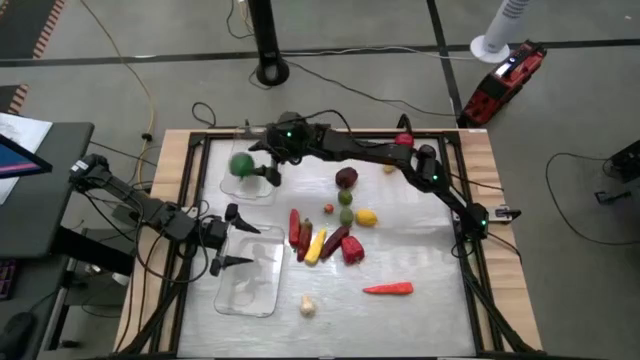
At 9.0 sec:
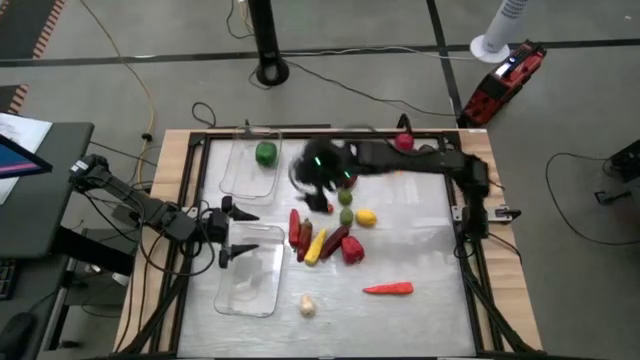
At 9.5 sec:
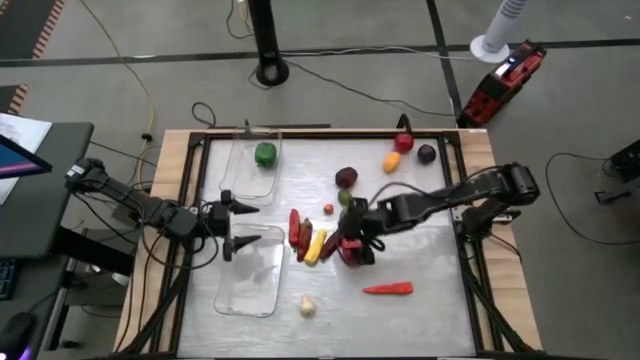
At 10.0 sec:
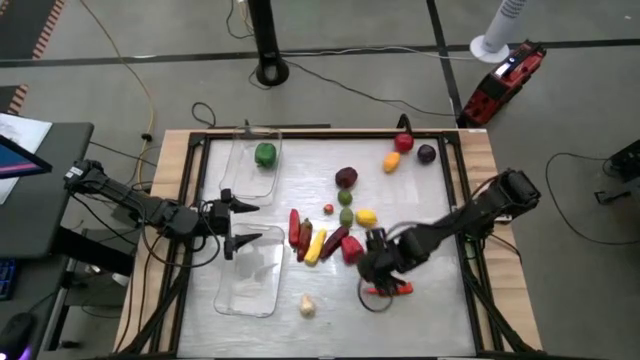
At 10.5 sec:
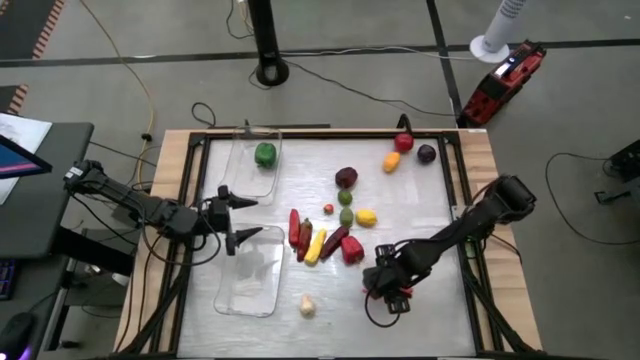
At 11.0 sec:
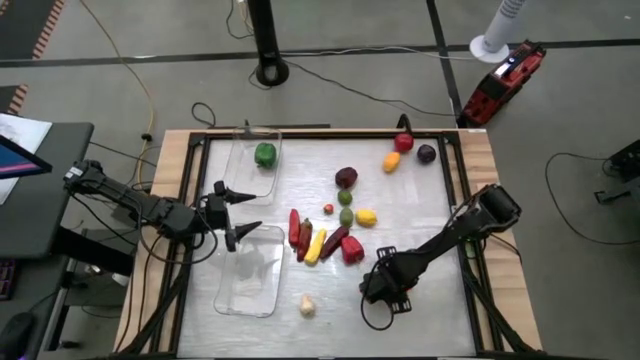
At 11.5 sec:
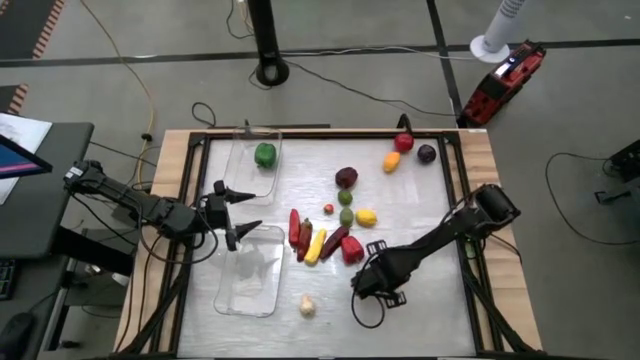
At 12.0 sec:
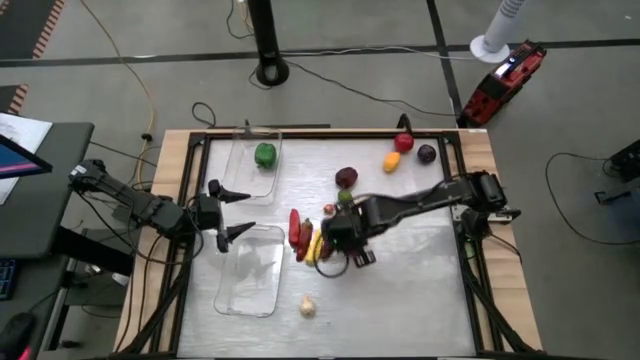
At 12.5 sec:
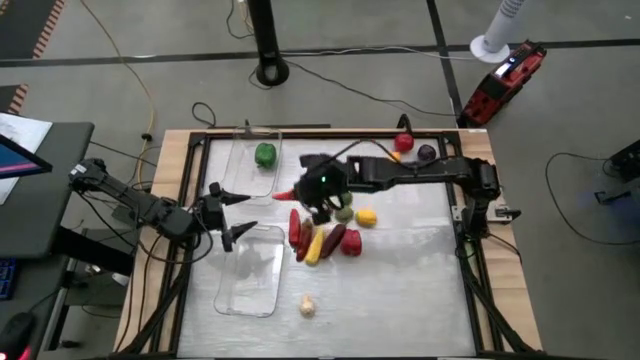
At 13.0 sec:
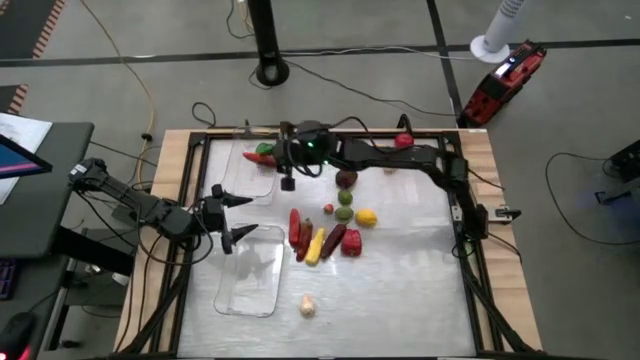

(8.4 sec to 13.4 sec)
Task: Sort produce into baskets
Put the carrot into the top transparent bin

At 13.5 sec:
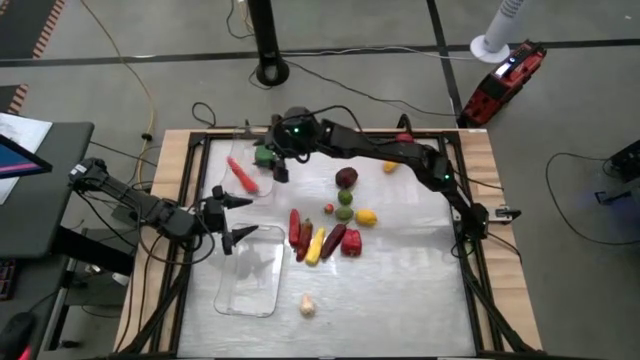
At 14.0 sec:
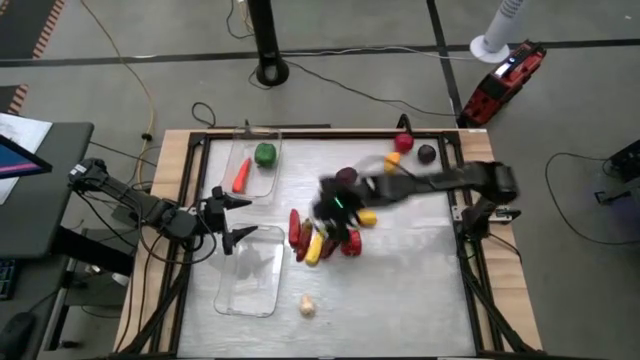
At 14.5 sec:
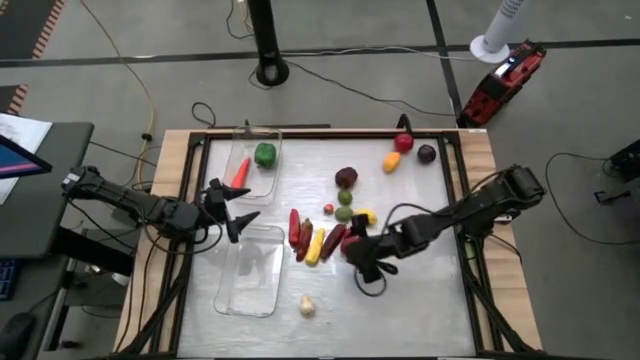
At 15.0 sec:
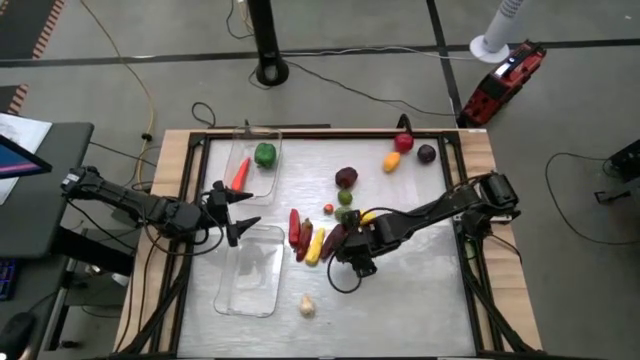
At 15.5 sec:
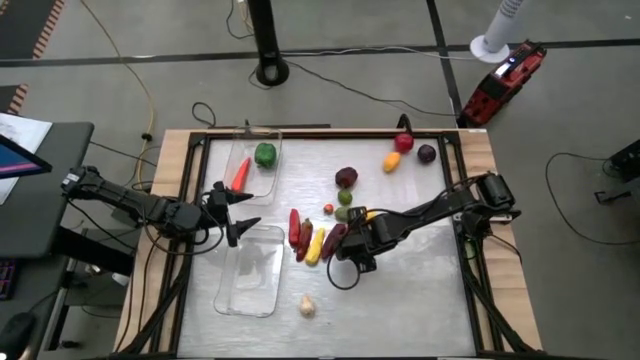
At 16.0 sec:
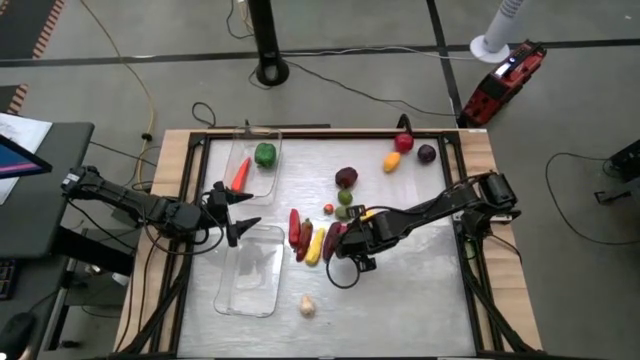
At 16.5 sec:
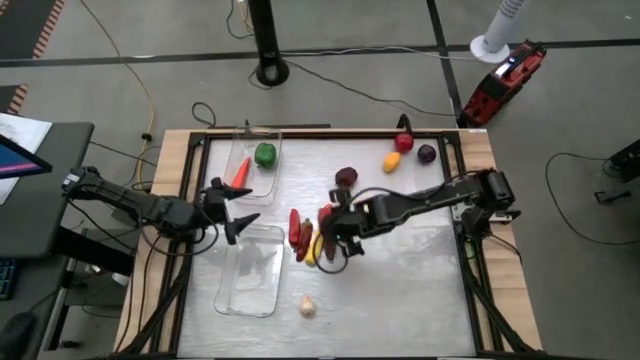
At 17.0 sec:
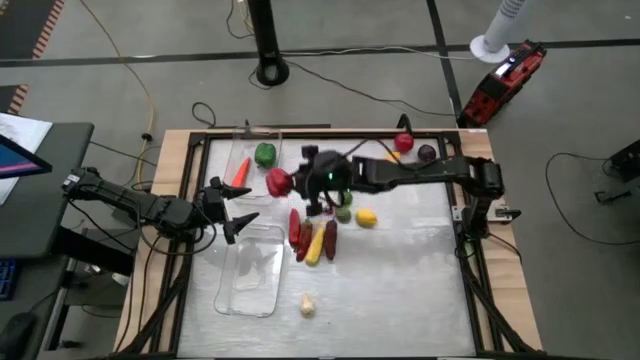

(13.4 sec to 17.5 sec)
Put the red bell pepper into the top transparent bin

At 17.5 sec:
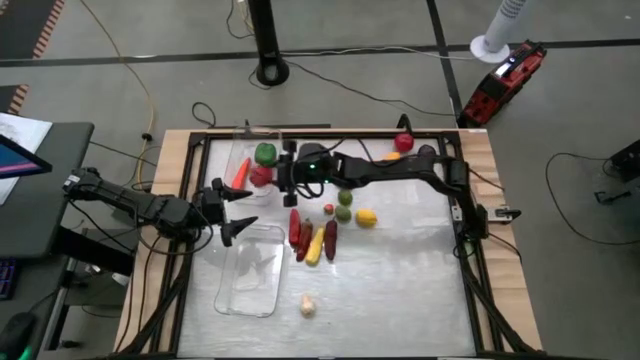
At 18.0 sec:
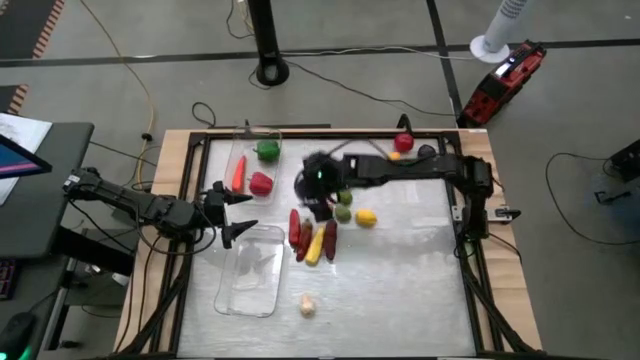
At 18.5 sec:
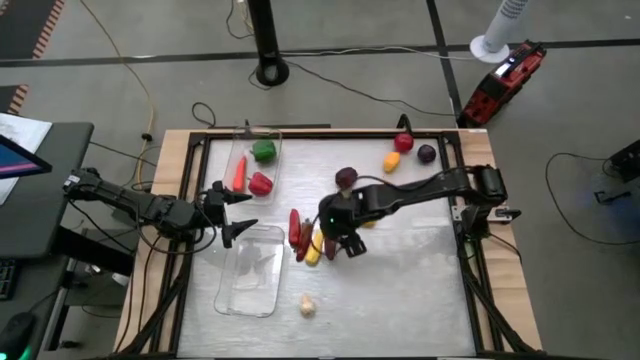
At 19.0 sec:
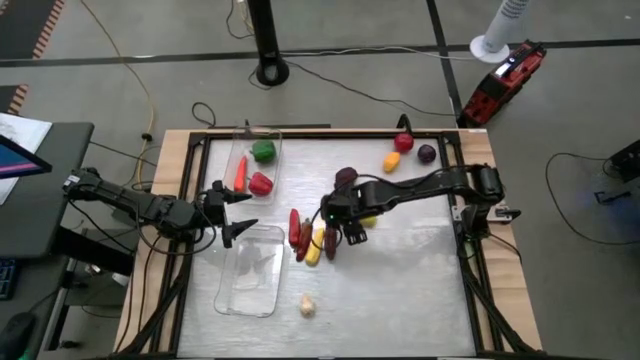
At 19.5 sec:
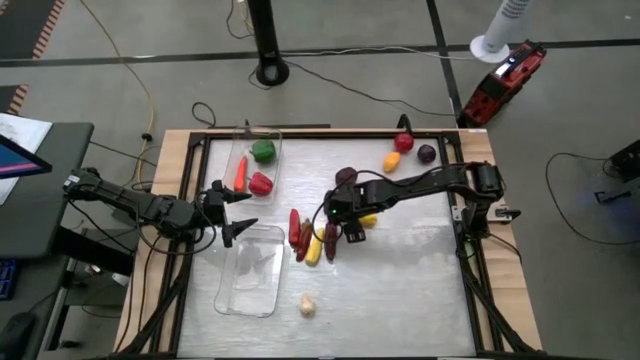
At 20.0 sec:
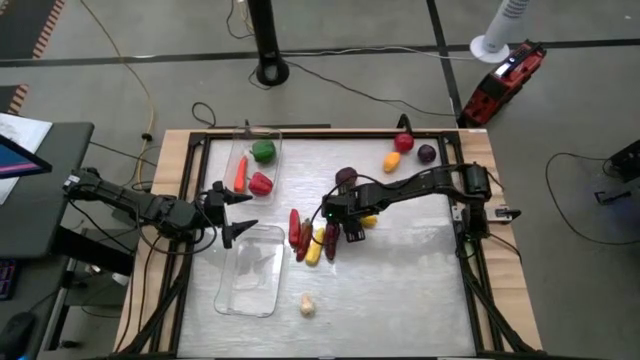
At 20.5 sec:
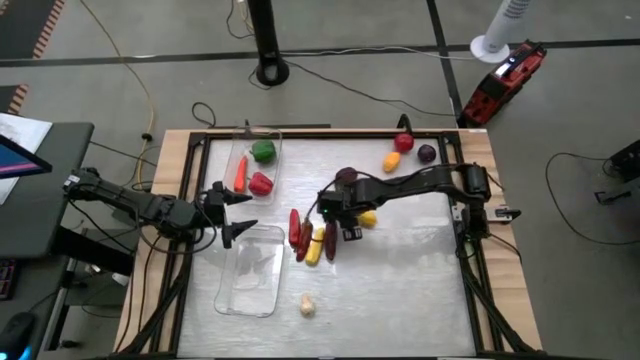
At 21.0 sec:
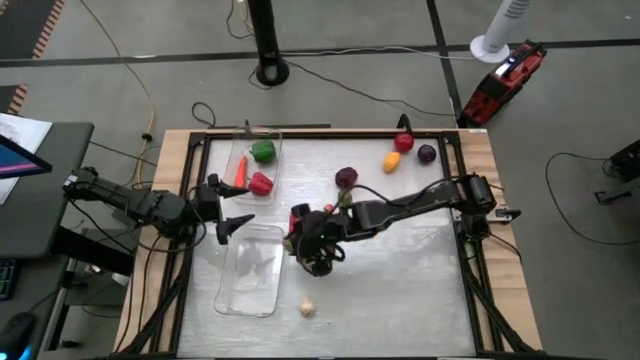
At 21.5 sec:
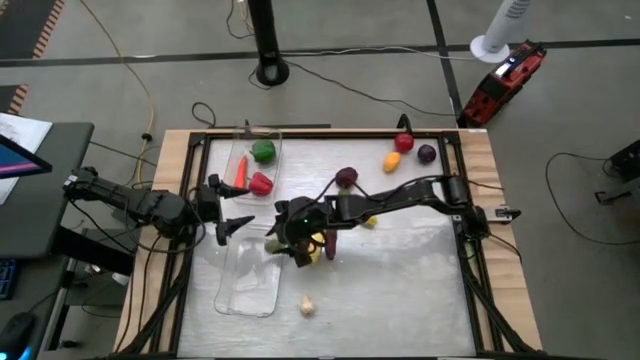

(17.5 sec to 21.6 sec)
Put the bottom green lime into the bottom transparent bin

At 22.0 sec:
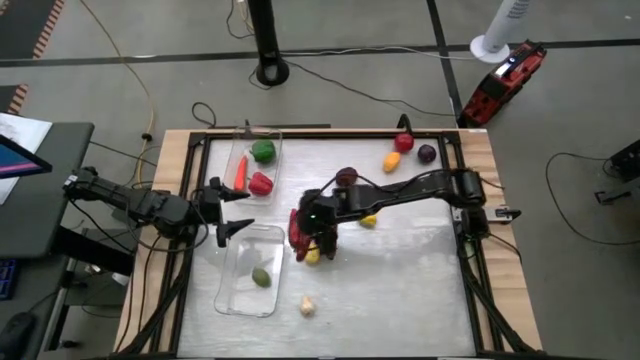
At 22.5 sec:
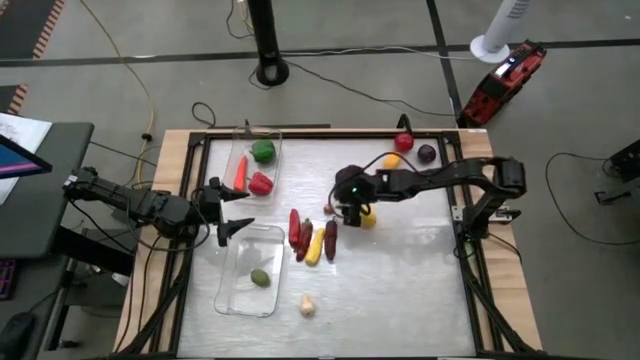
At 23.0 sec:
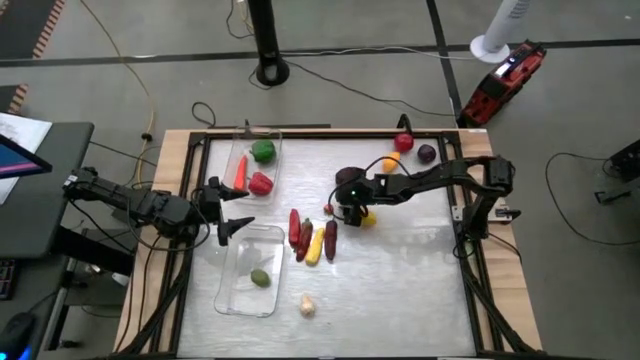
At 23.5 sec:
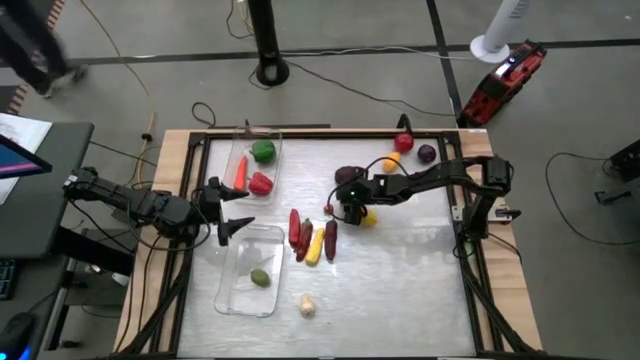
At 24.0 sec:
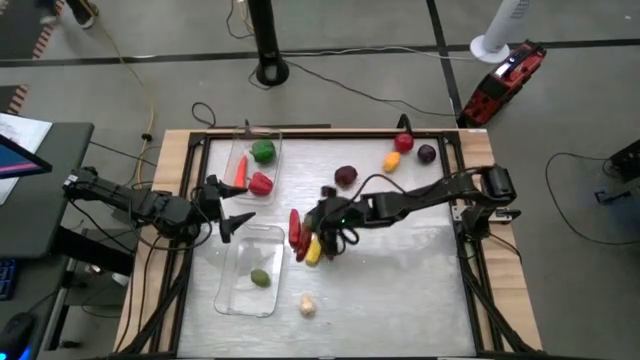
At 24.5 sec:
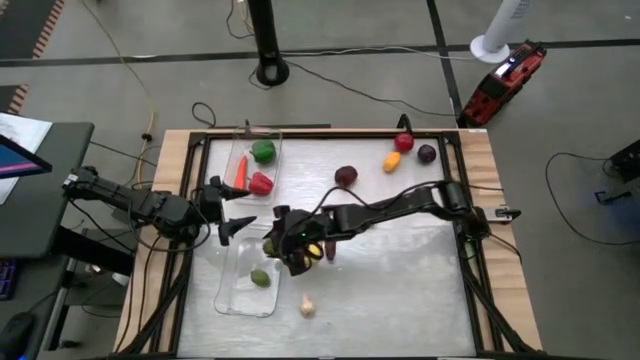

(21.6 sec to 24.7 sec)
Put the green lime into the bottom transparent bin

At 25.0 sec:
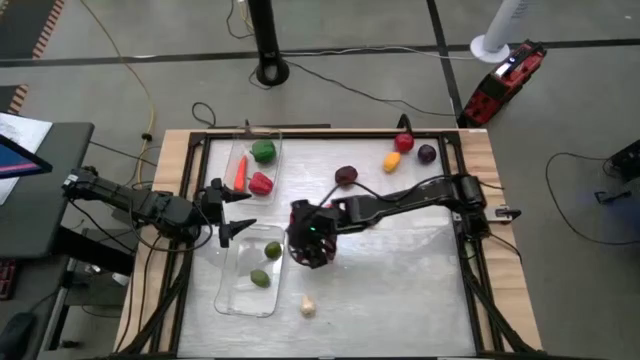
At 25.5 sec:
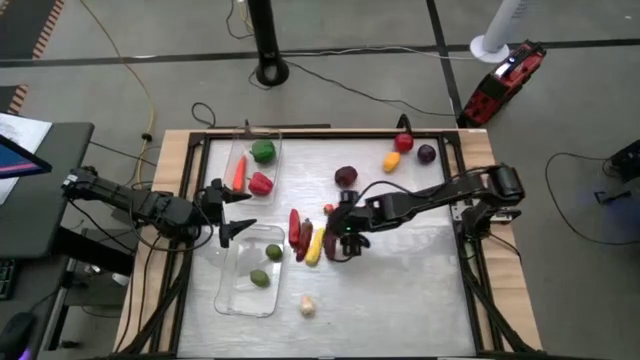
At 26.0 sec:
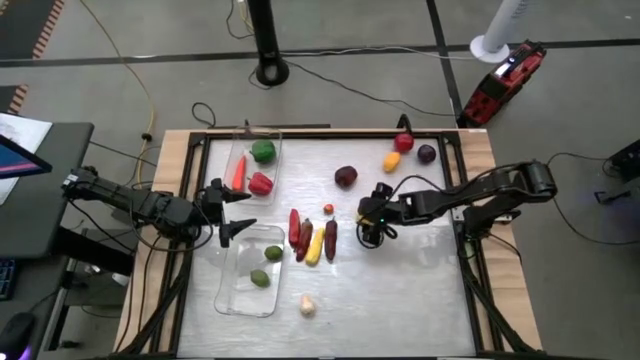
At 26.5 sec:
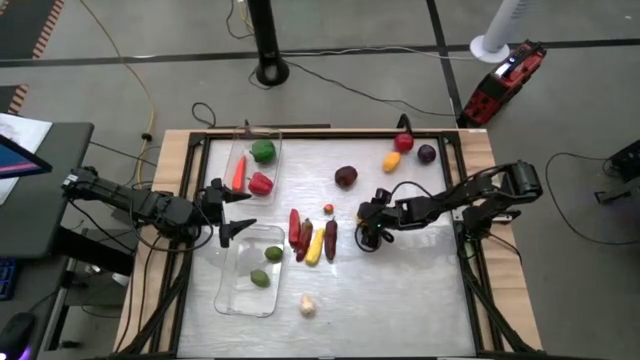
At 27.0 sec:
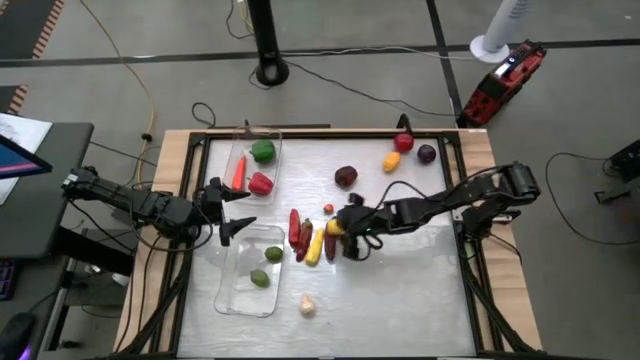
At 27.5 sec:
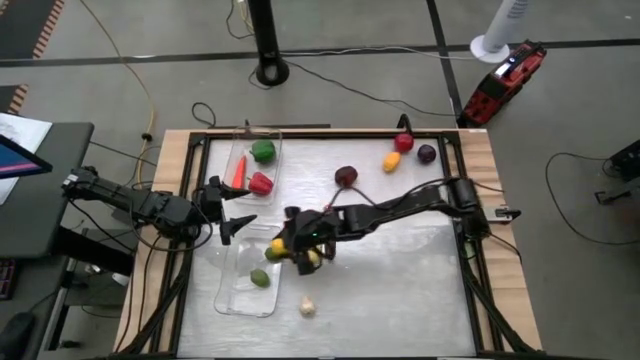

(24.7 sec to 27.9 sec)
Put the bottom yellow lime into the bottom transparent bin

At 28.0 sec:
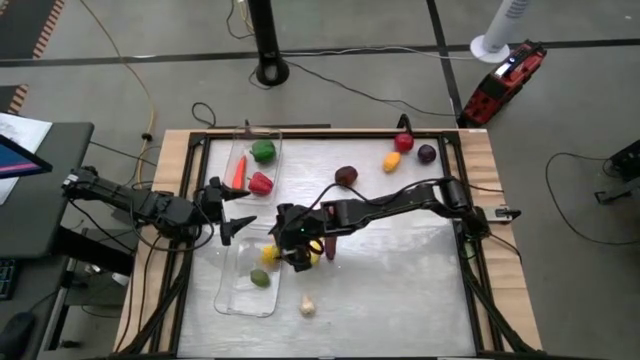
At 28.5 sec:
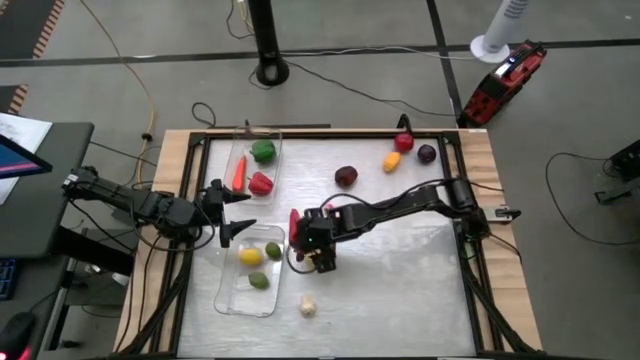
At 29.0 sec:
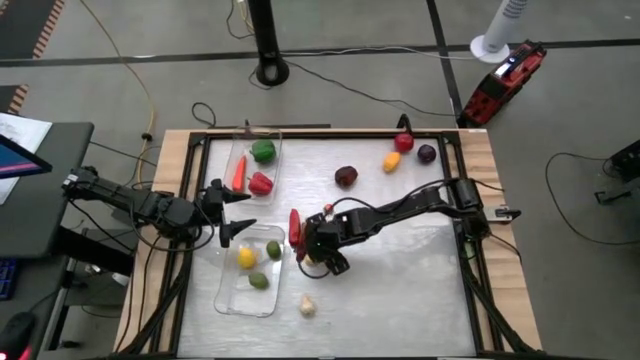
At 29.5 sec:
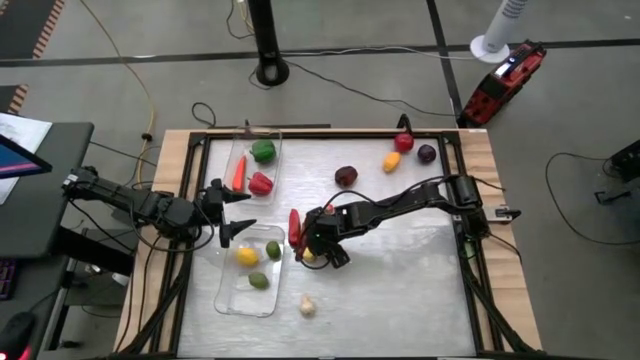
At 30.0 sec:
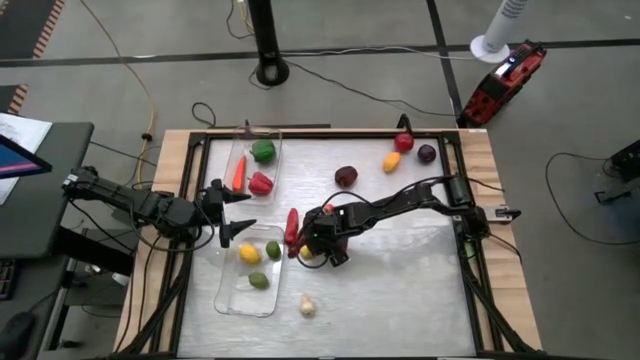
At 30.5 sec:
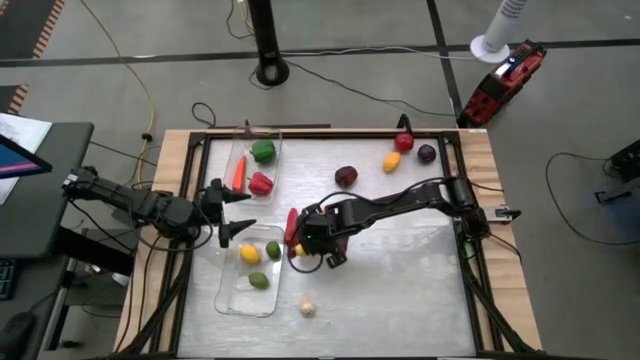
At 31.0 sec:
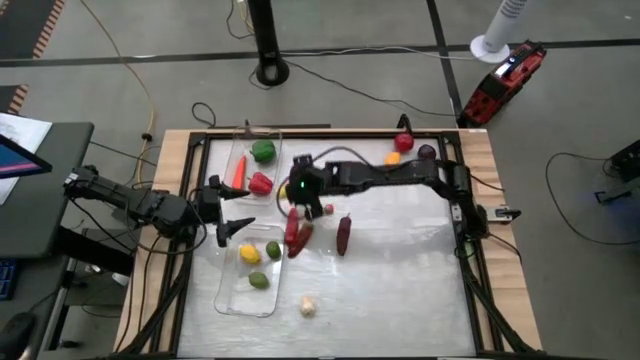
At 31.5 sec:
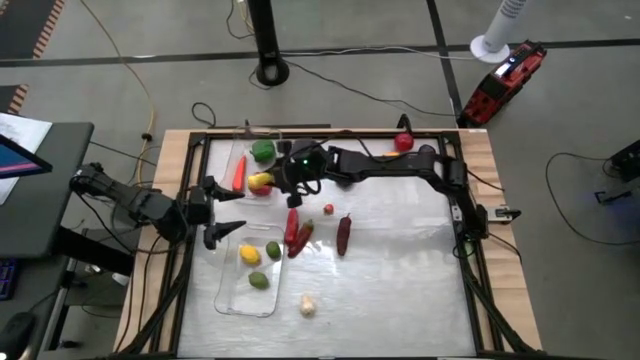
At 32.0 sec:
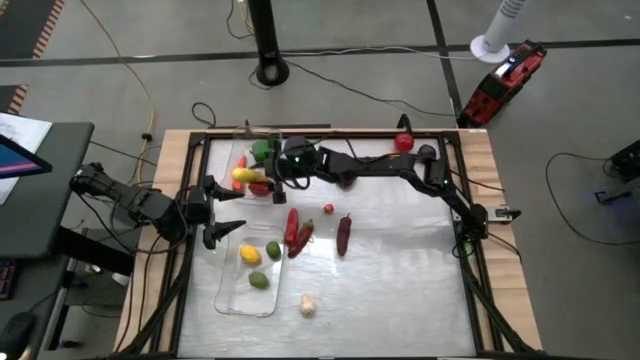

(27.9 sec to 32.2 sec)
Put the corn into the top transparent bin
